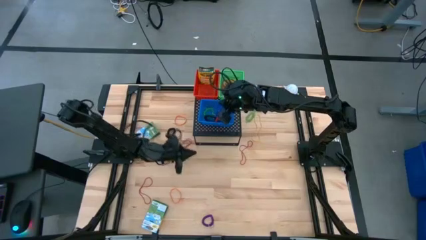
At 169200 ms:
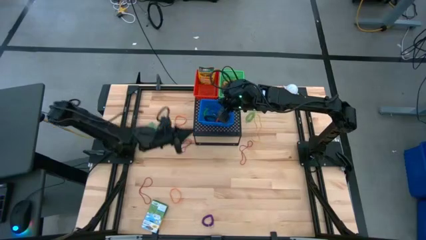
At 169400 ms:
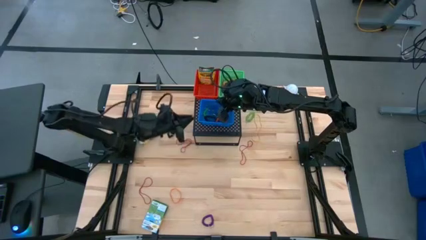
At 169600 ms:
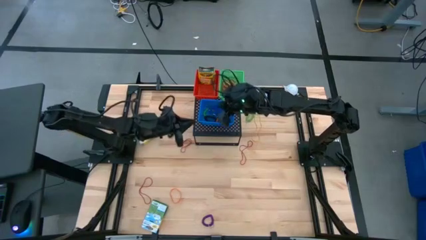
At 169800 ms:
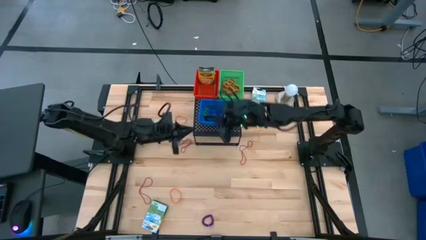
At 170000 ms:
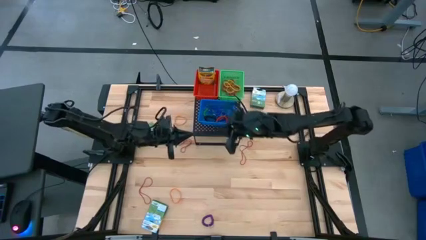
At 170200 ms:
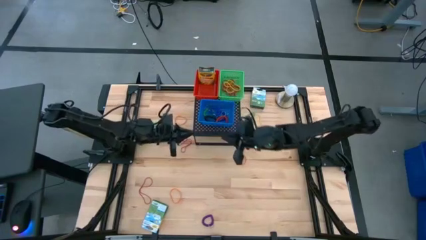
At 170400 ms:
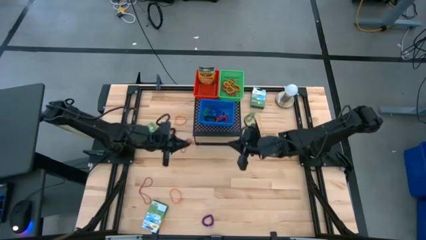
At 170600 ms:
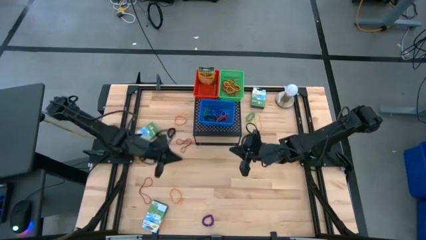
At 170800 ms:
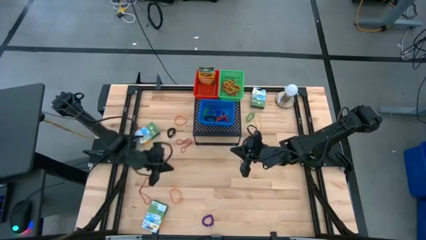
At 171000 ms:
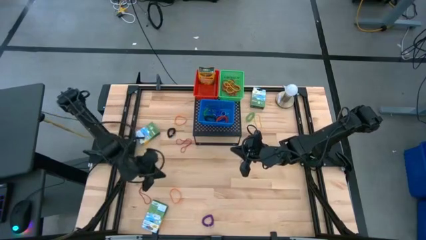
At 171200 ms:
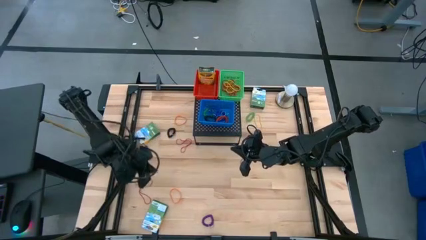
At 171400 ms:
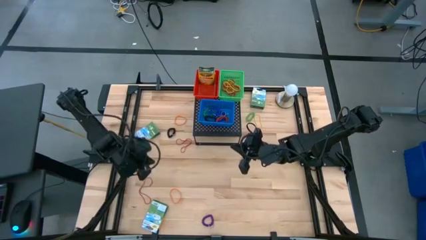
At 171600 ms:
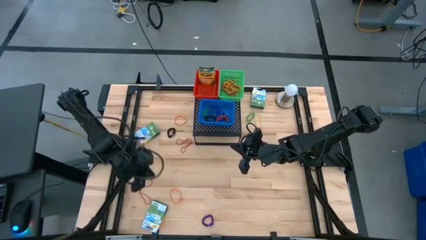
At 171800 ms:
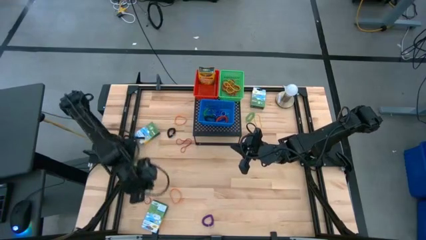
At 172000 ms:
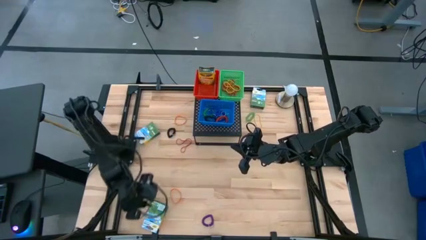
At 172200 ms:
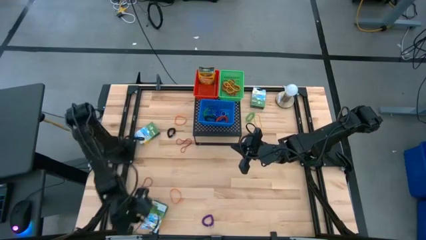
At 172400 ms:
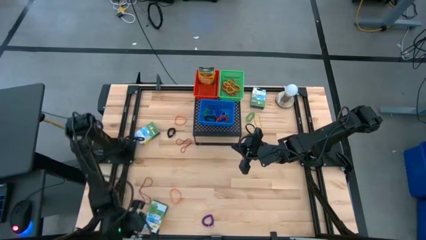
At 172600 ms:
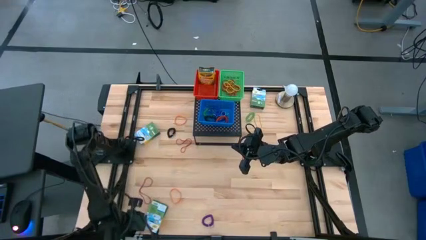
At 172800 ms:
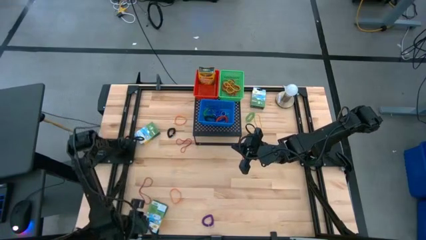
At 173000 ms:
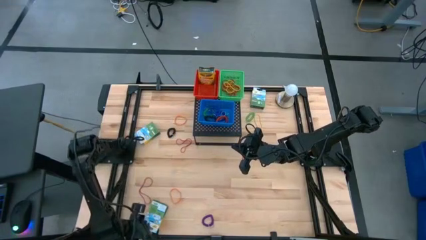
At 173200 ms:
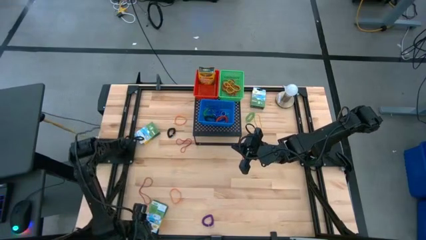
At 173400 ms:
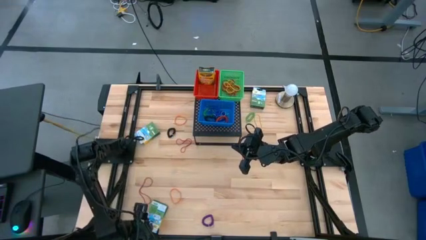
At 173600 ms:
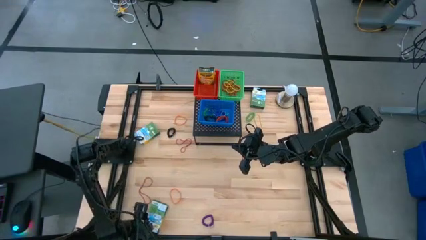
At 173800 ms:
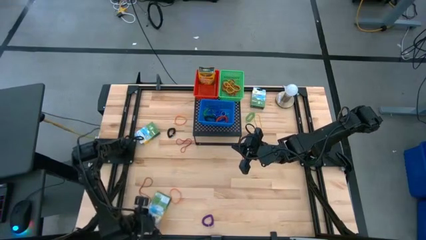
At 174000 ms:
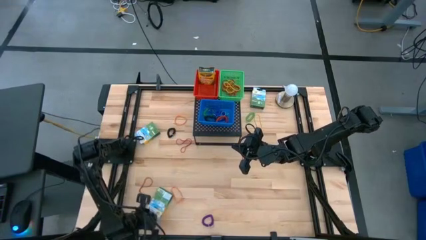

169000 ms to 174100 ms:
Task: Pick & Place Office Desk Supplies
Put the yellow crayon box into the red bin on the shelf

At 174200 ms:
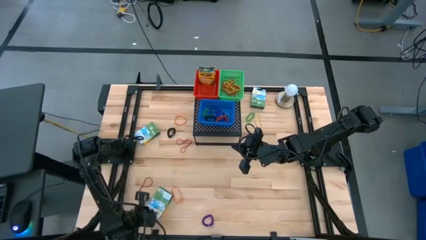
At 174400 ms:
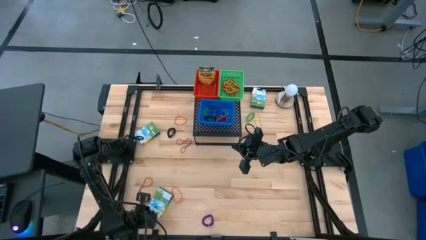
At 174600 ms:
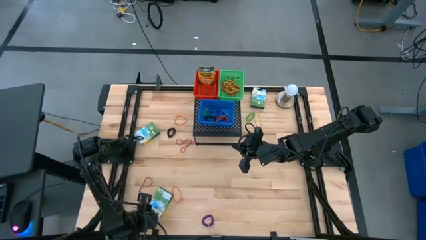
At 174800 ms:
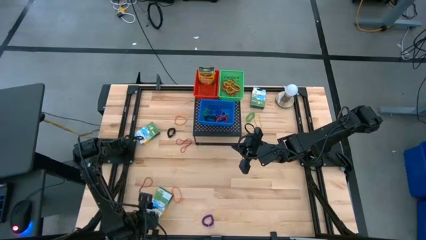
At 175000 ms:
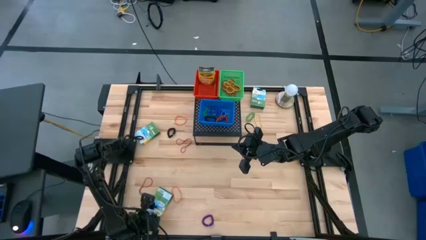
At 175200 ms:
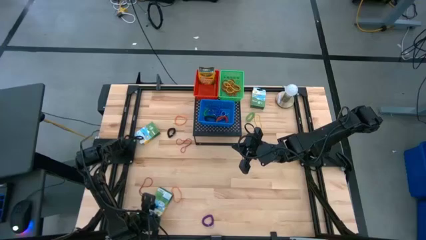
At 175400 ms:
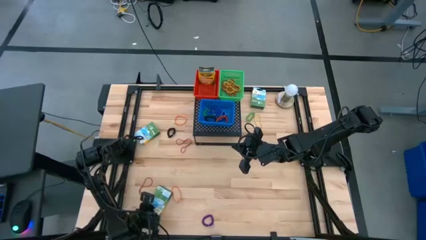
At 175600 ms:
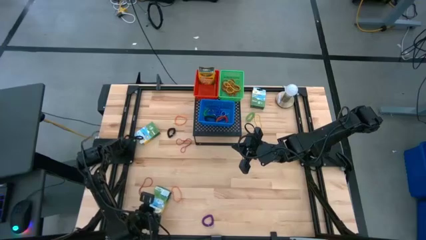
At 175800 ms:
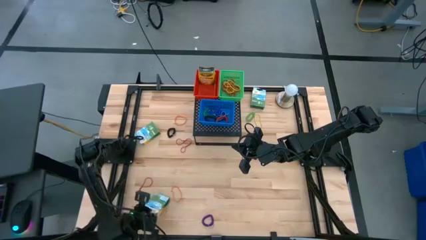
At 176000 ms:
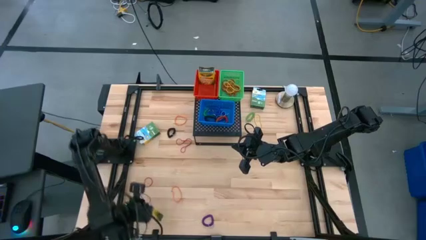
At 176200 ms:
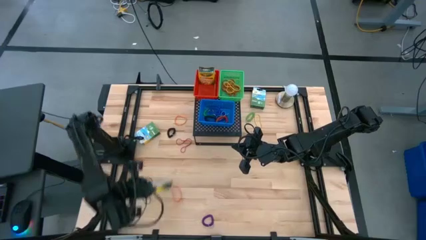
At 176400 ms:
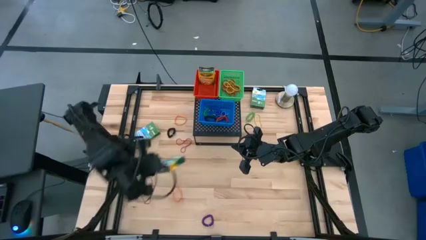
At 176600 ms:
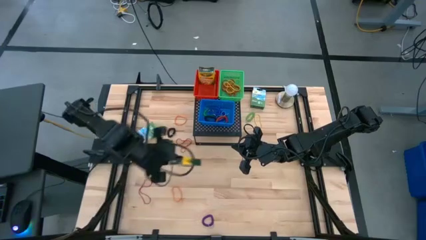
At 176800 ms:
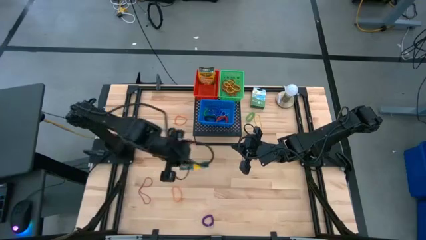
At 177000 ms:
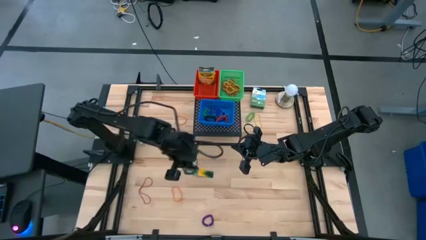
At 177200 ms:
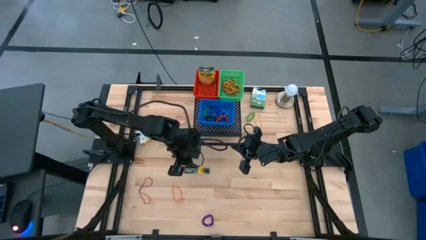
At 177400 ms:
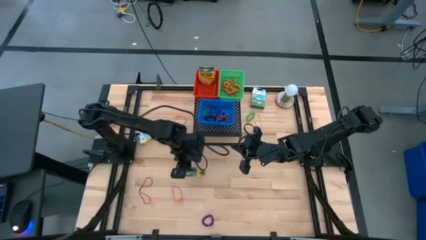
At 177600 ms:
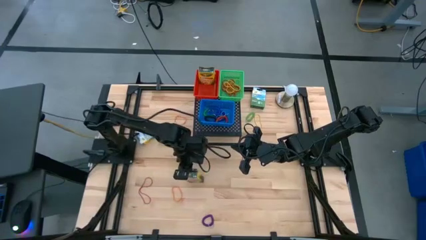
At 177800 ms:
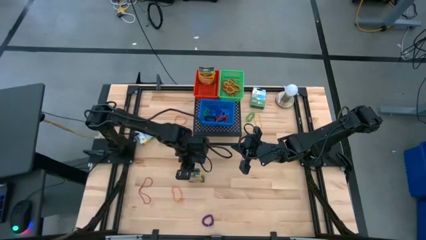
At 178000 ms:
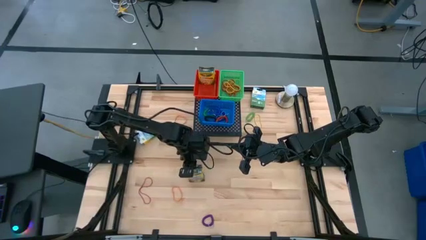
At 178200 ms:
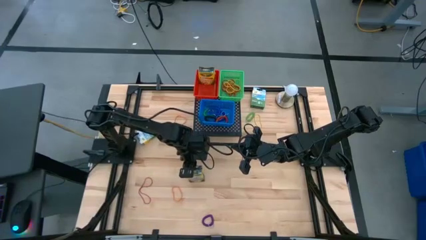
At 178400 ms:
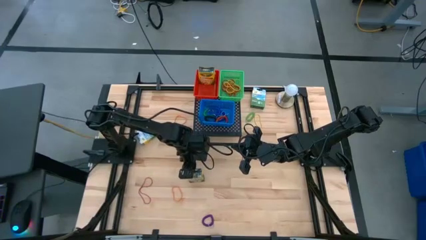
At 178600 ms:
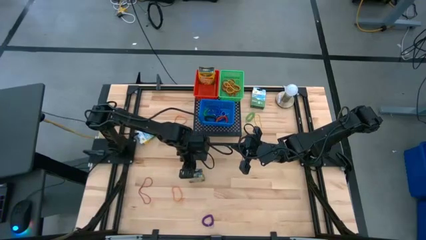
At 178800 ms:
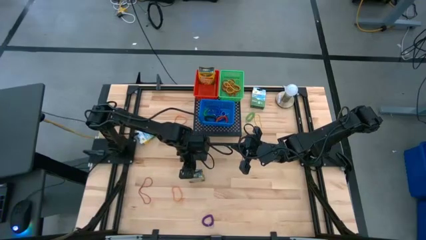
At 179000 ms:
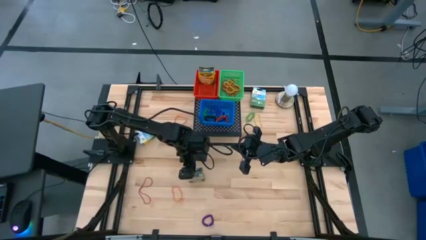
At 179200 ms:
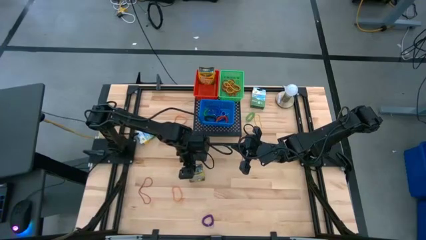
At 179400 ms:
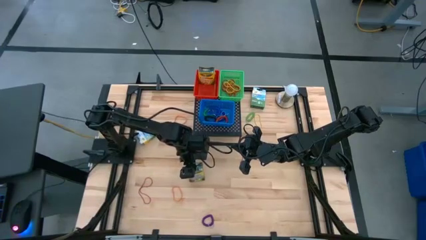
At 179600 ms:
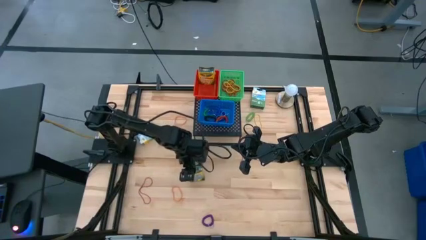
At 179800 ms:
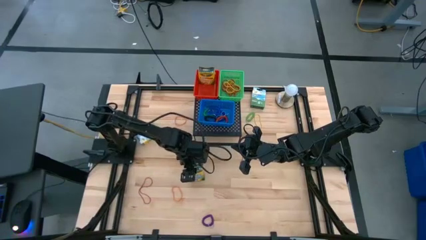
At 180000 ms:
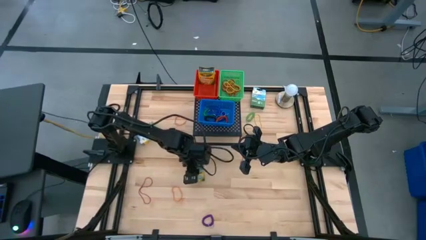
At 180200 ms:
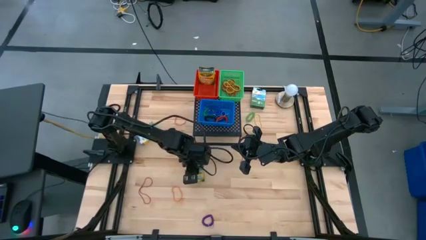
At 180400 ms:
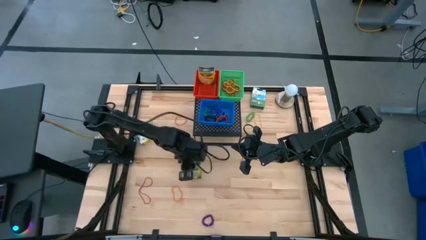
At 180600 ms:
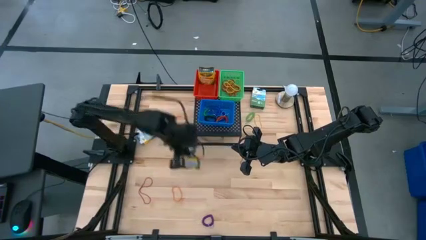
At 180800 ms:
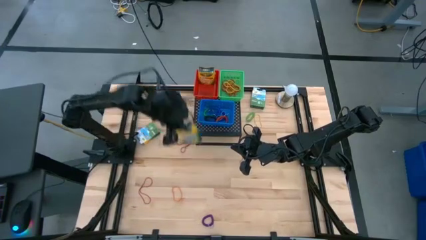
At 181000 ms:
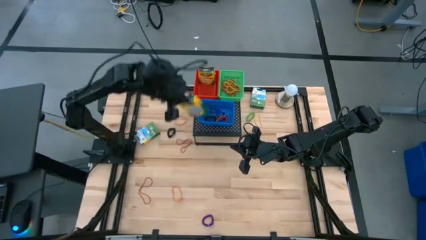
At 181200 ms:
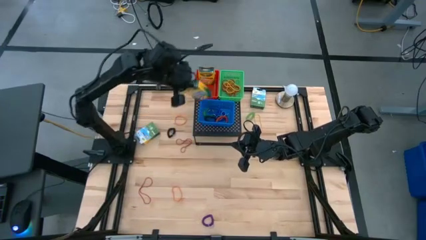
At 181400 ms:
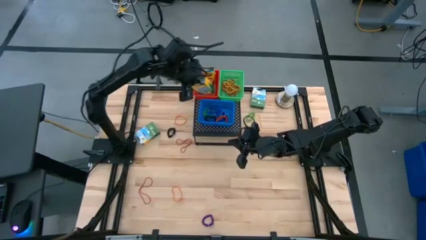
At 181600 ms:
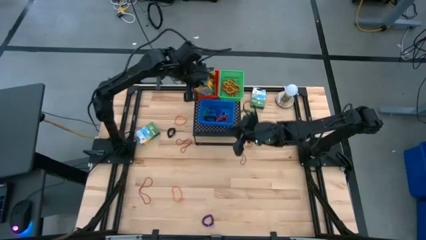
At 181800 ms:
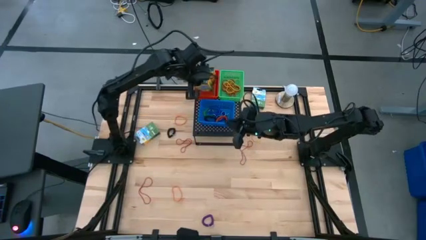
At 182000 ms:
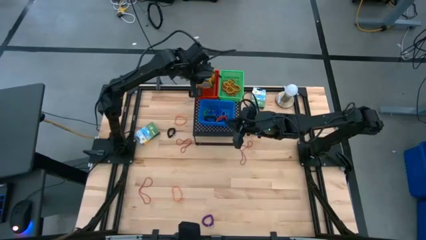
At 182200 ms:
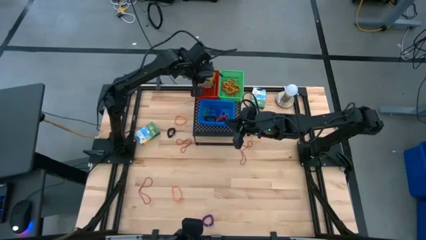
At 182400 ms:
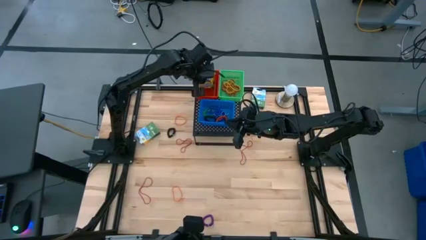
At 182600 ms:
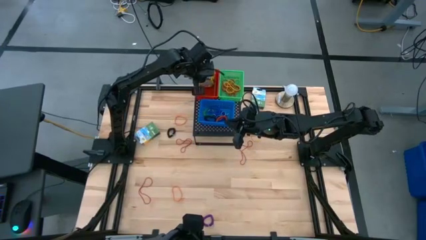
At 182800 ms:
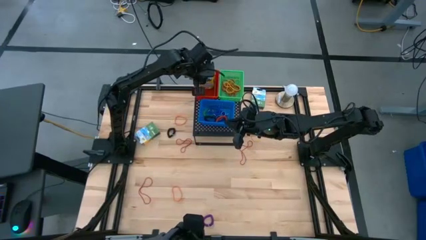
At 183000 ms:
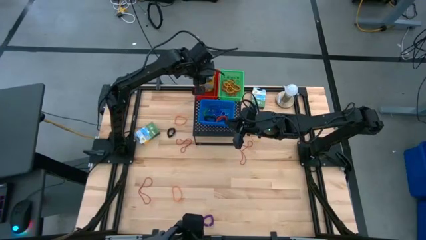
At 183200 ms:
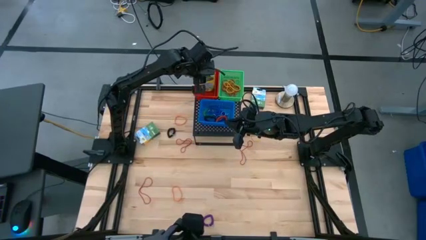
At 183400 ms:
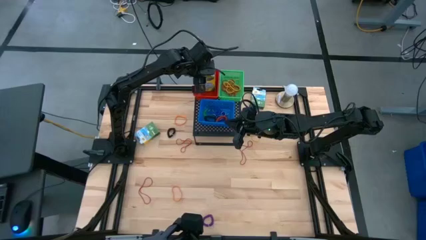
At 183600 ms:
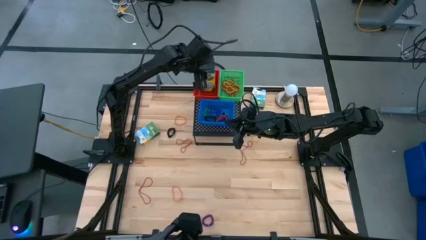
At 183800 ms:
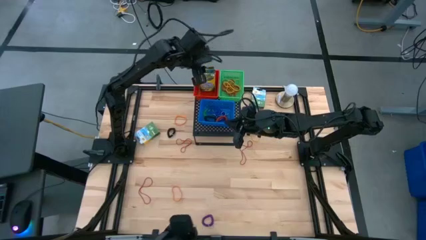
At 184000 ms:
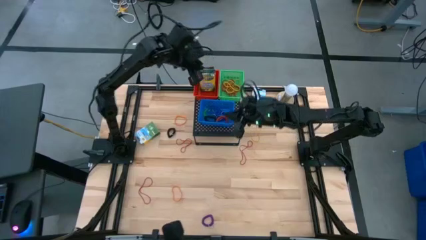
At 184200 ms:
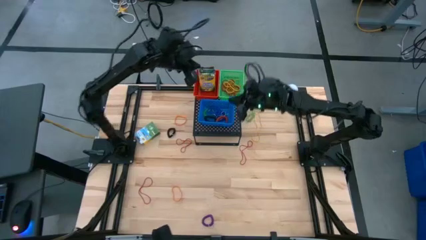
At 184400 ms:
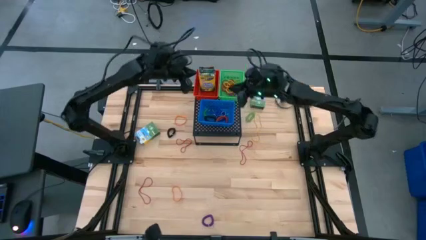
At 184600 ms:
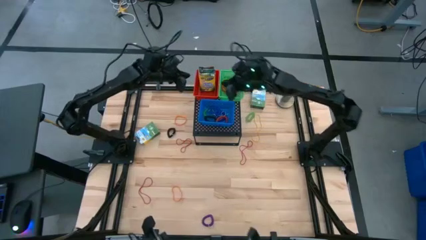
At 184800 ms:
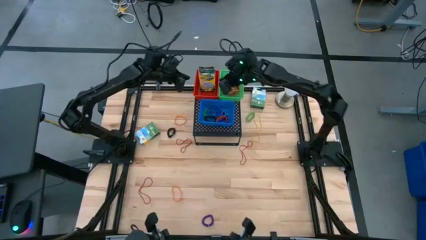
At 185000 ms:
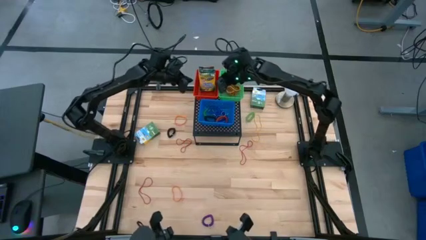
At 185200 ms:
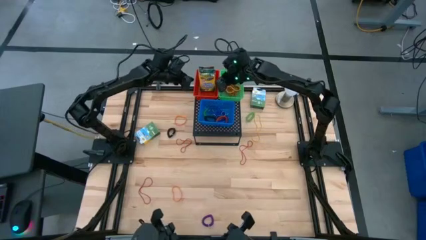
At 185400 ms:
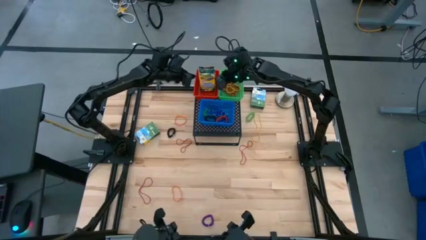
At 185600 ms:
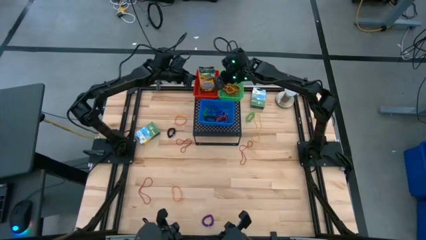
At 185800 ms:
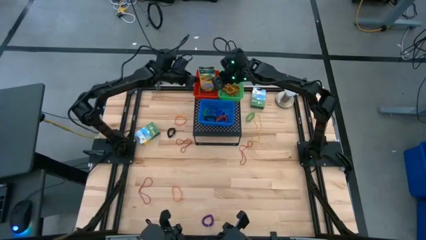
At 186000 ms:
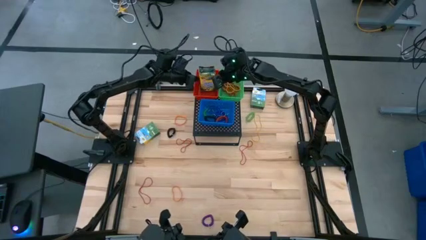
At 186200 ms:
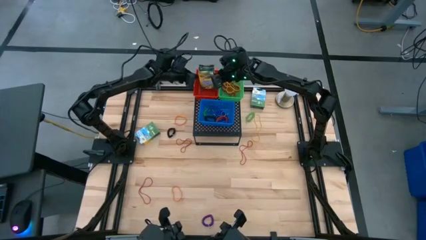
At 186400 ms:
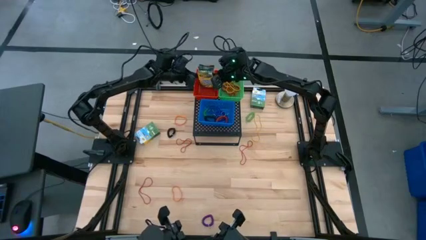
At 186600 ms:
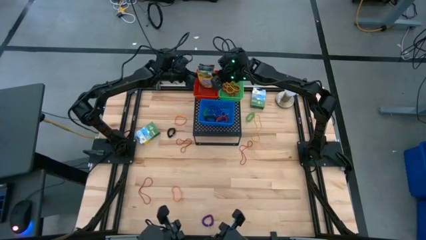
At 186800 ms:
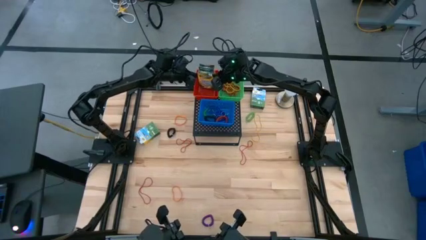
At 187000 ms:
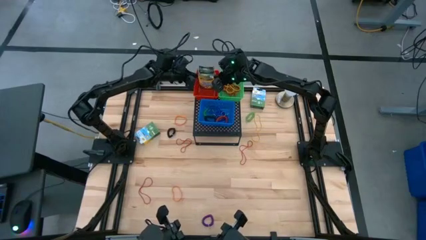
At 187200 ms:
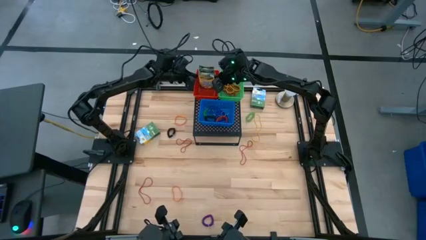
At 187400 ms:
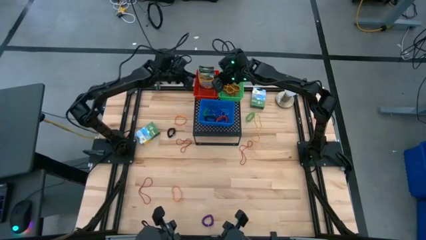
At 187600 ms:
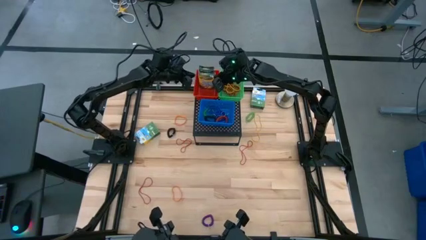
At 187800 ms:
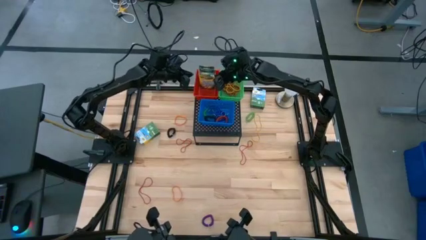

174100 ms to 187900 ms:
Put the yellow crayon box into the red bin on the shelf
